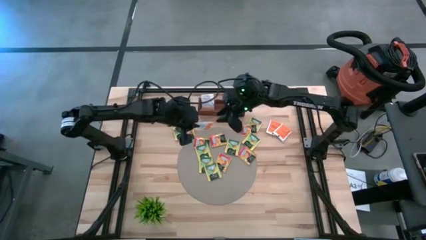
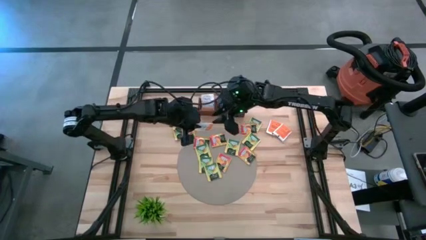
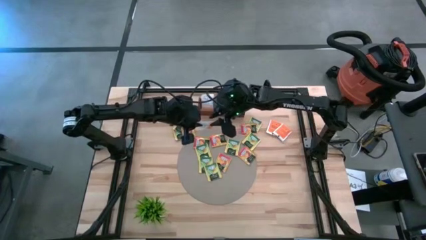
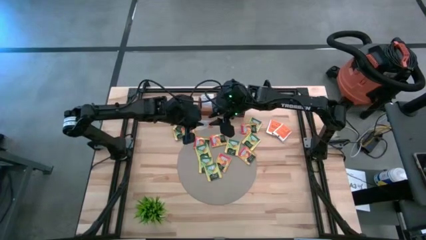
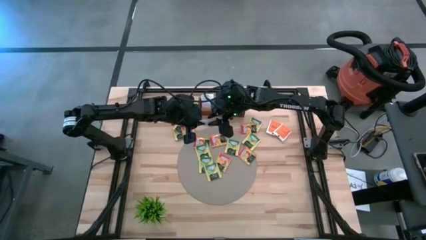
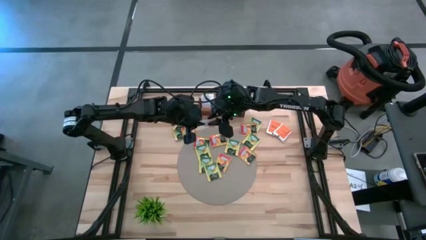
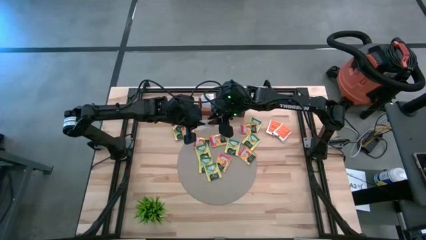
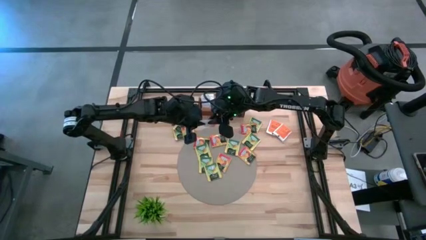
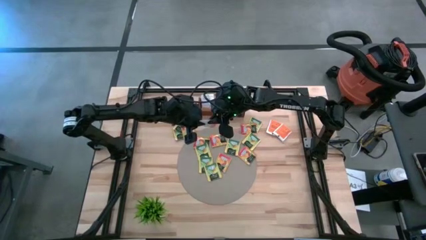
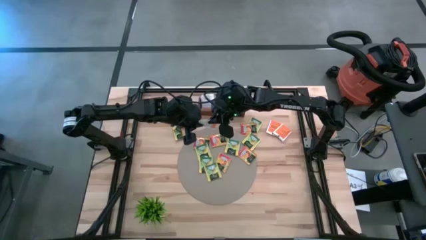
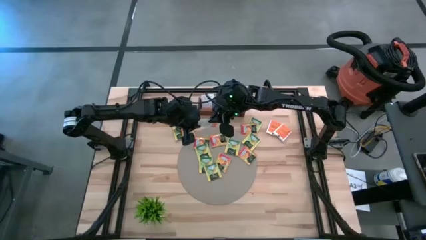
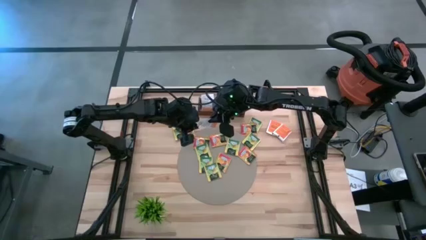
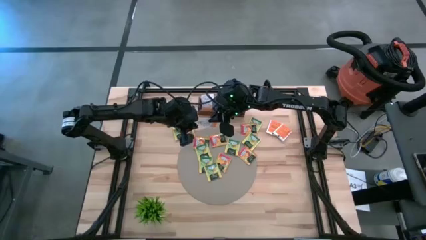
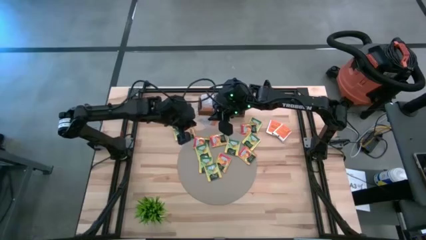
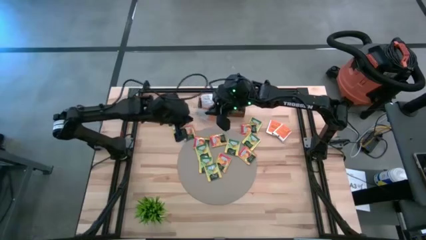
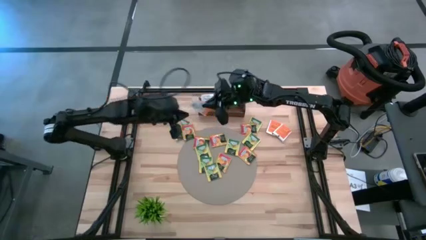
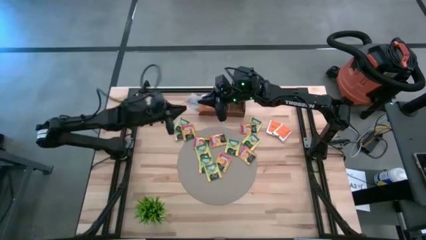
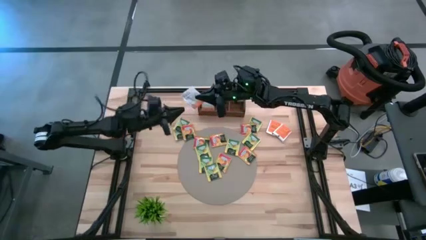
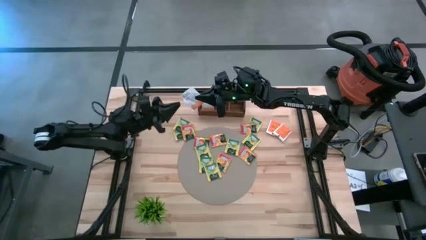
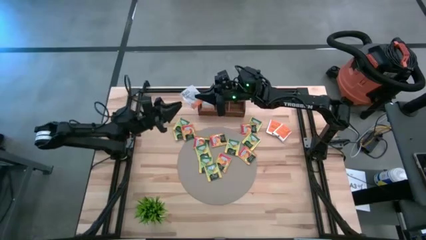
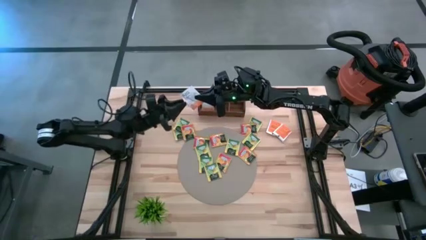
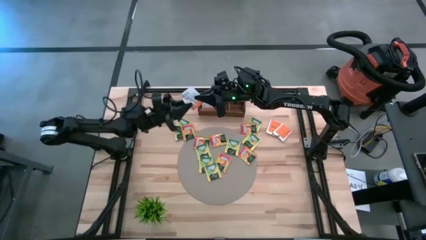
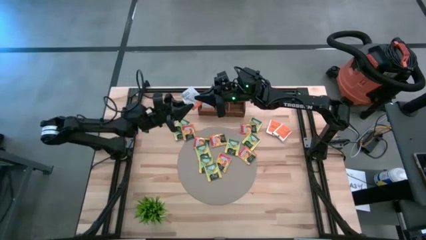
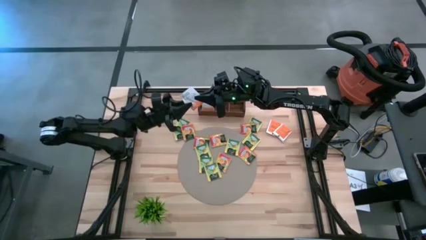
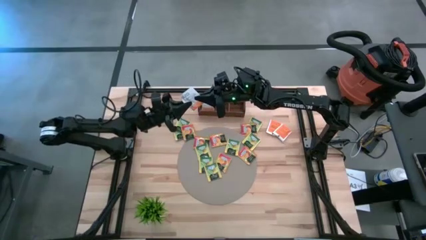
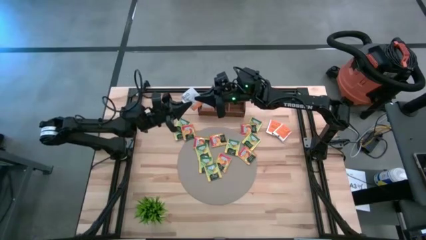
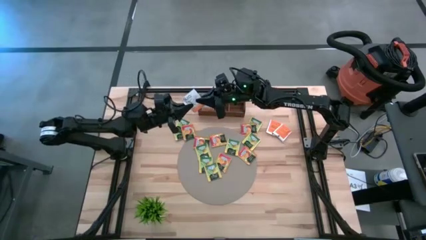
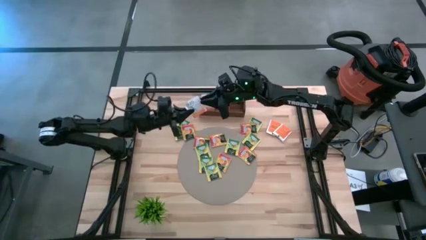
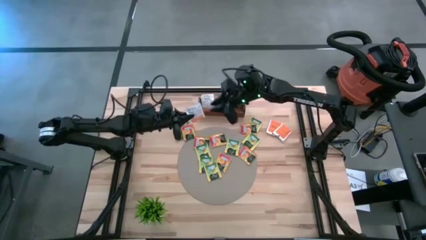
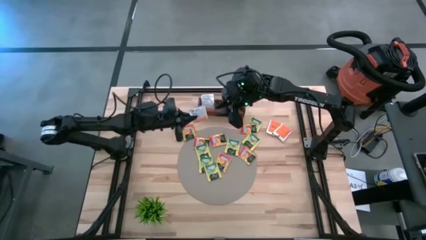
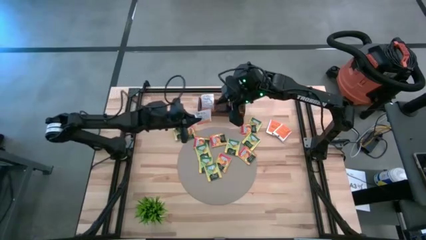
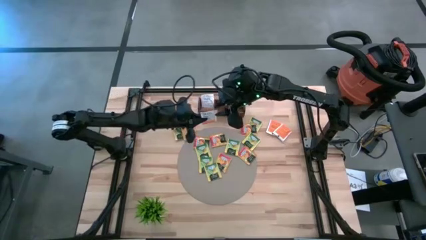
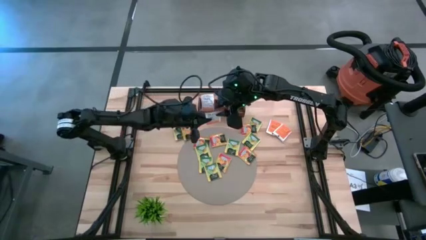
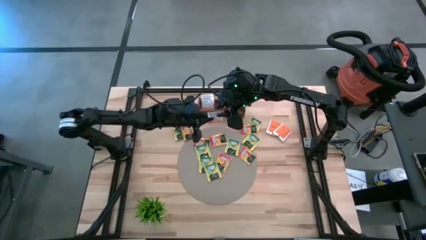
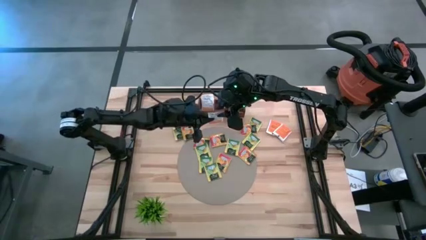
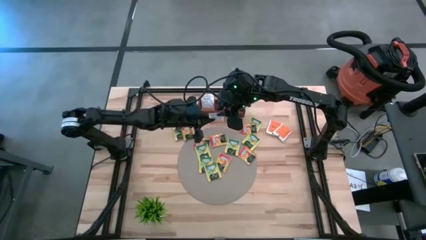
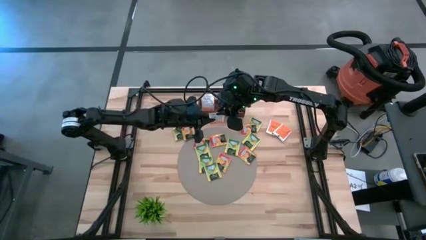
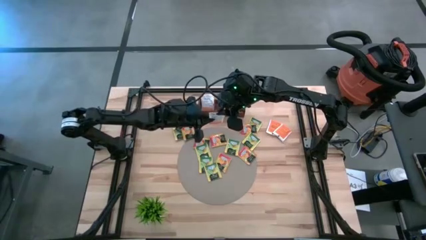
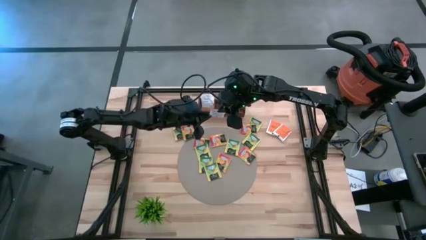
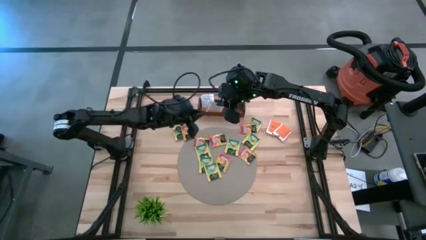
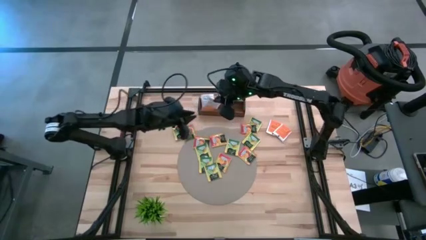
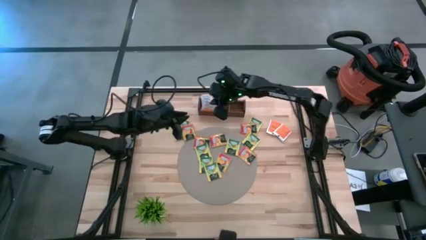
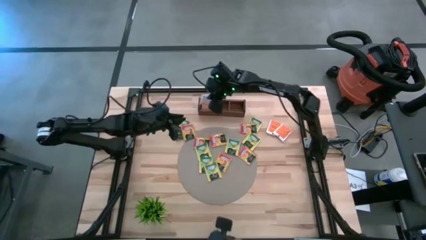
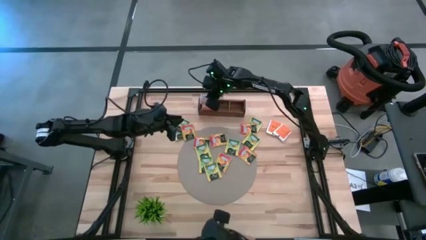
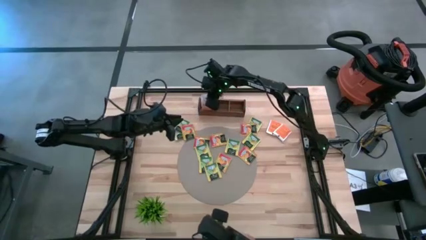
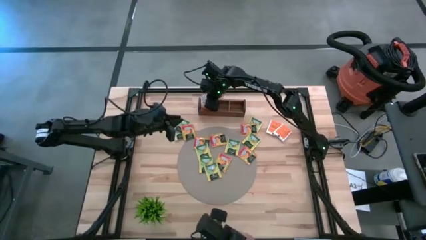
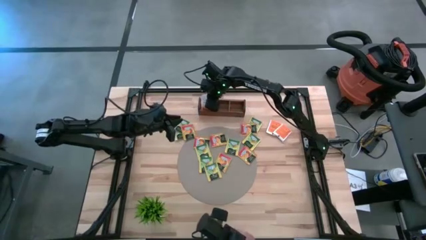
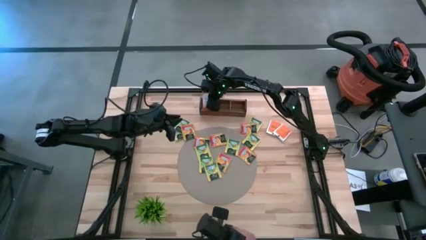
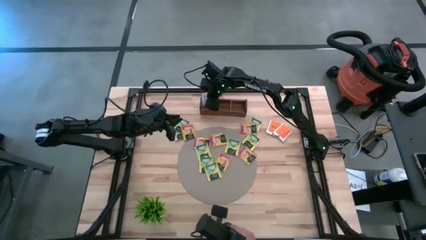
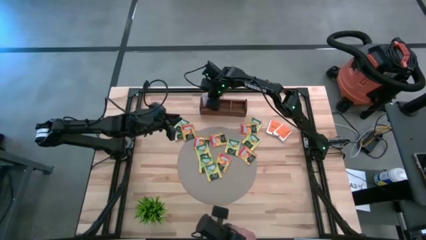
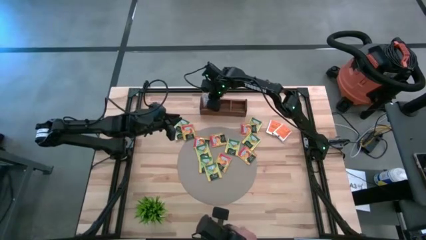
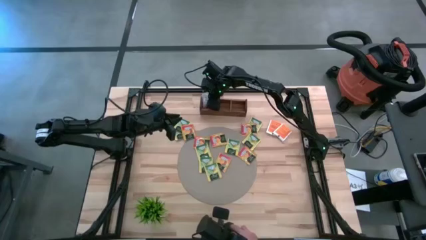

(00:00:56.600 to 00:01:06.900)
Task: Pick & Place Tea
Put the white tea bag into the left section of the wooden organizer

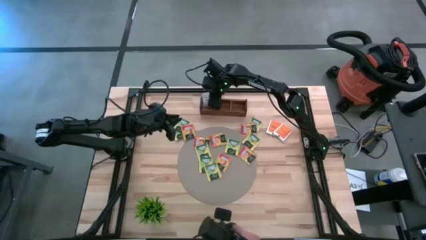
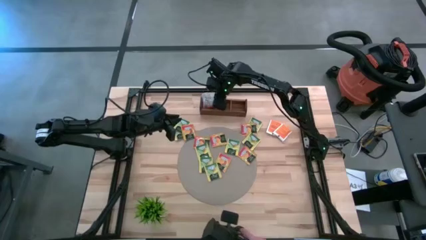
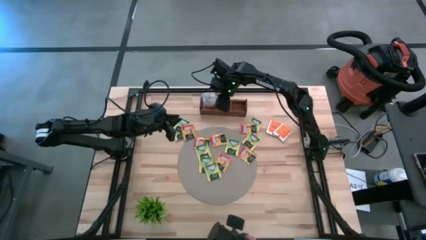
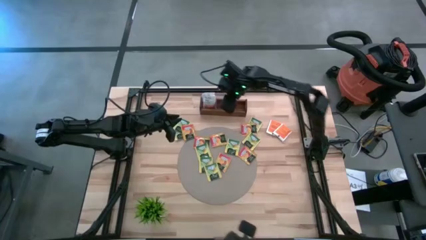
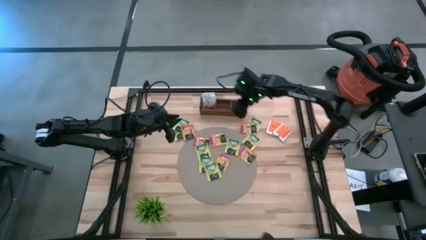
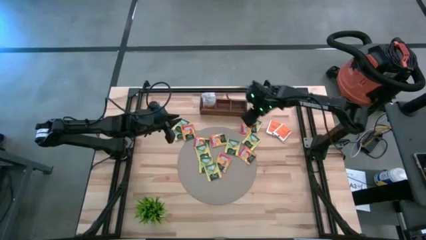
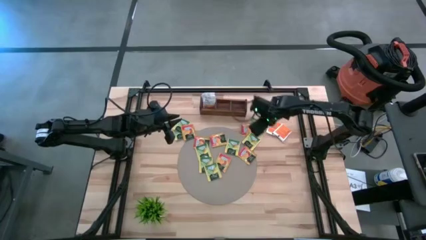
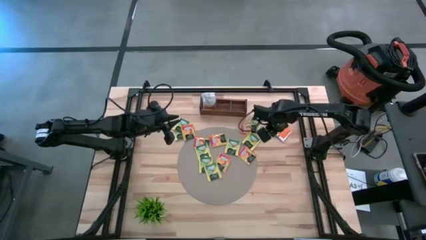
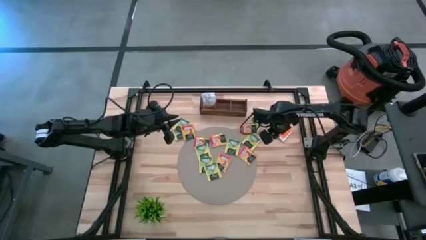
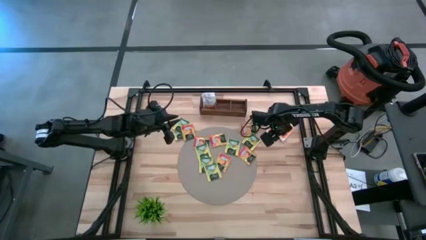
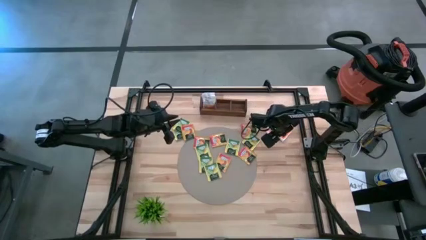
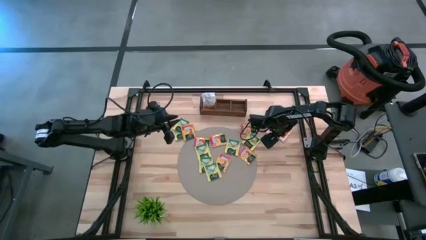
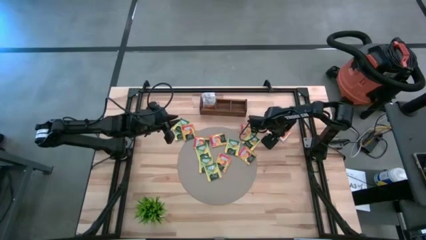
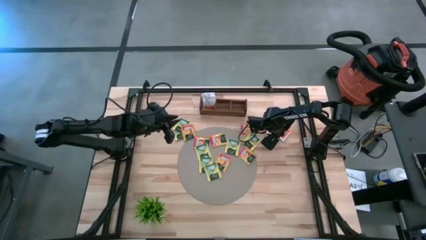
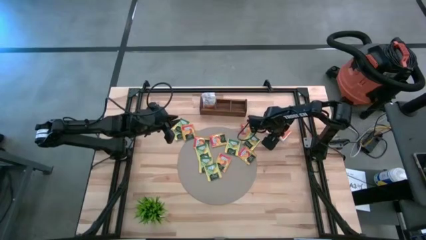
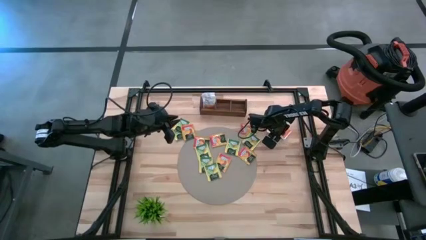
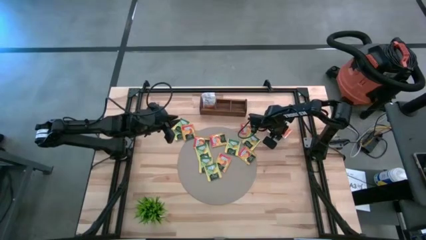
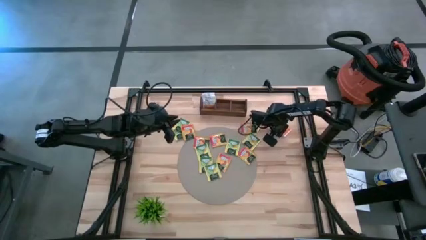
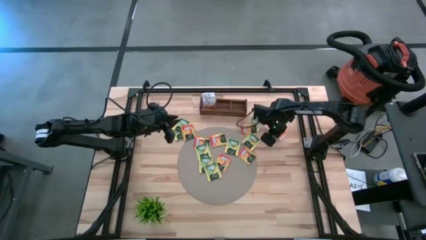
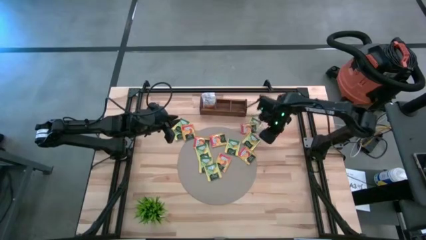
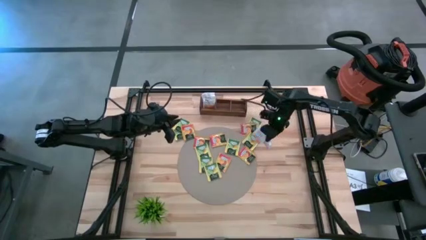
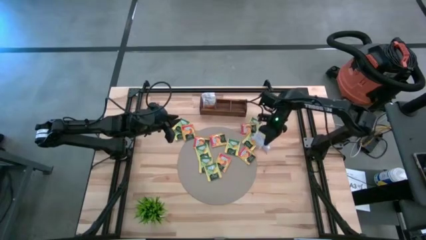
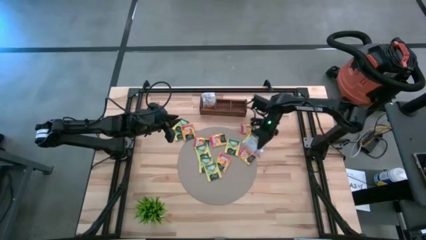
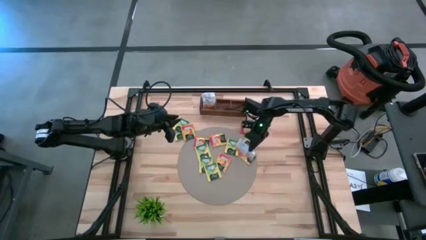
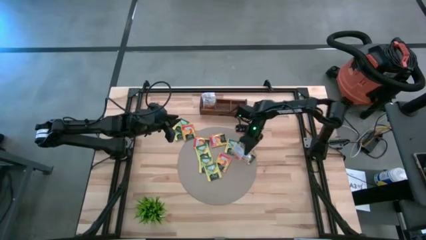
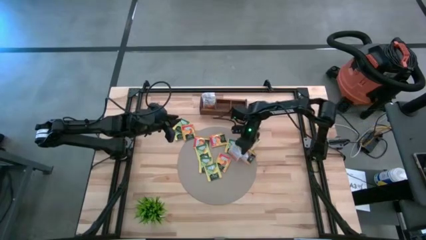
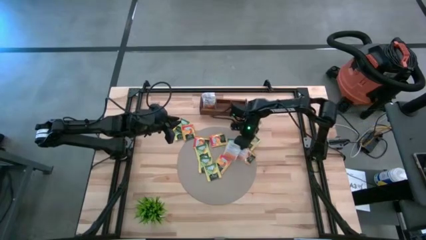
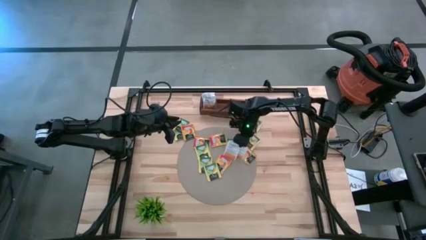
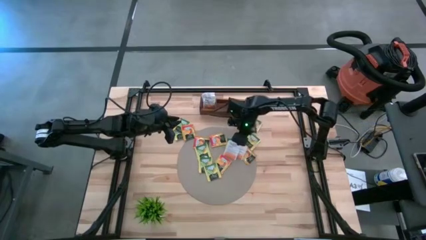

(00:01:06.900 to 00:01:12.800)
Put the white tea bag into the left section of the wooden organizer
